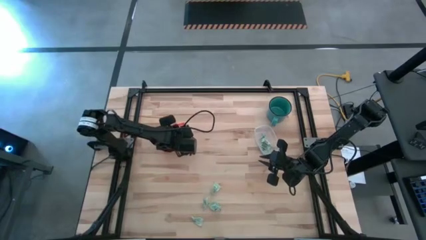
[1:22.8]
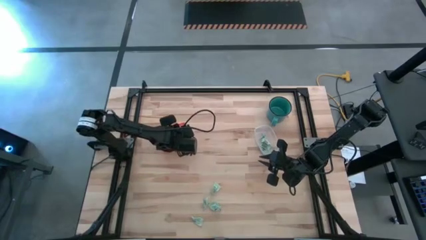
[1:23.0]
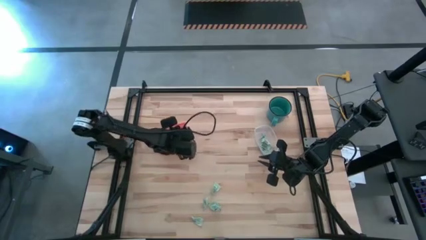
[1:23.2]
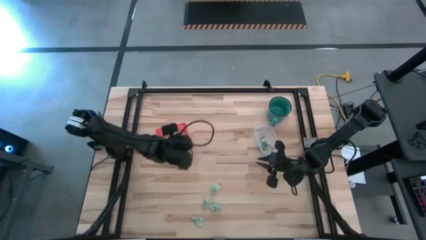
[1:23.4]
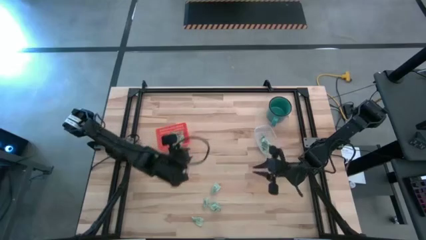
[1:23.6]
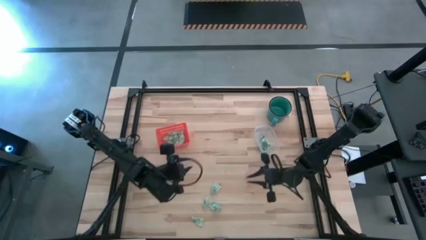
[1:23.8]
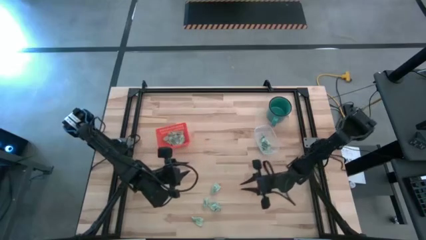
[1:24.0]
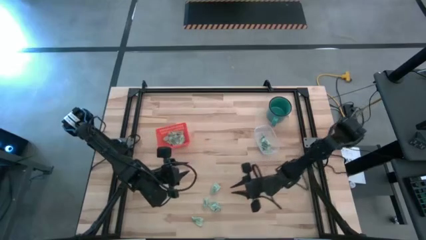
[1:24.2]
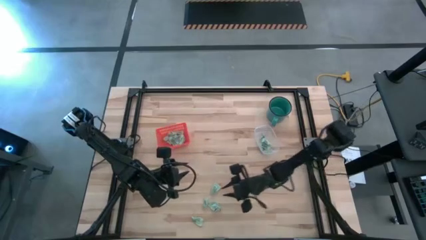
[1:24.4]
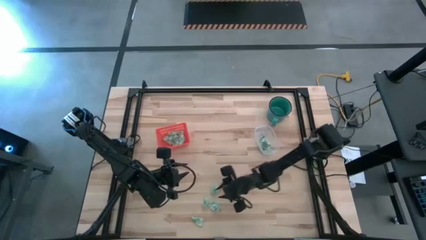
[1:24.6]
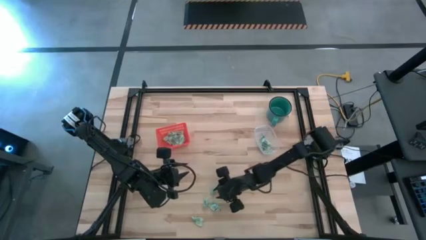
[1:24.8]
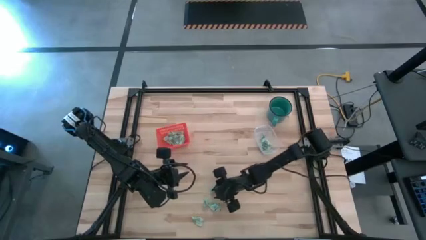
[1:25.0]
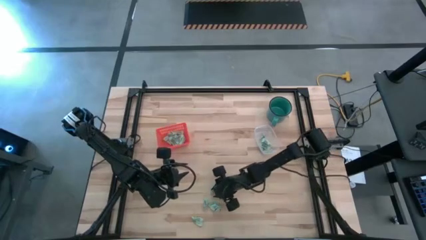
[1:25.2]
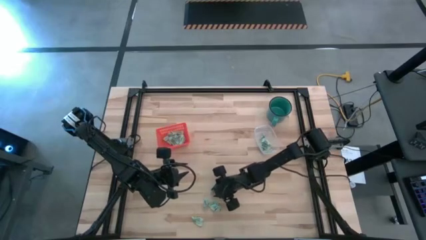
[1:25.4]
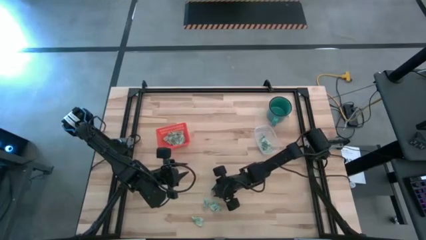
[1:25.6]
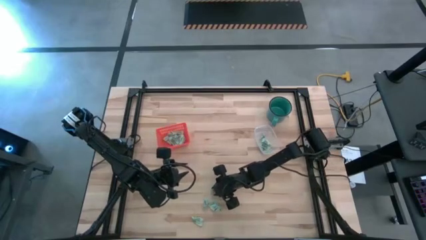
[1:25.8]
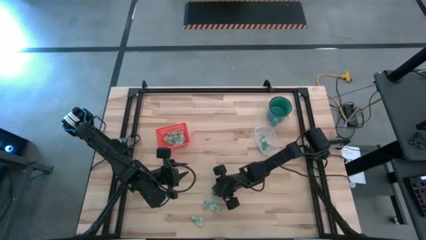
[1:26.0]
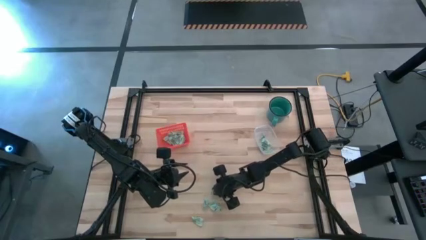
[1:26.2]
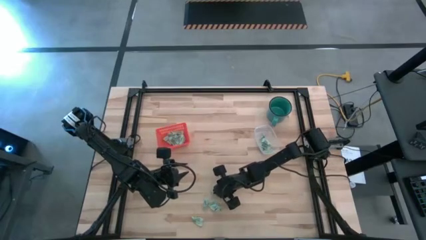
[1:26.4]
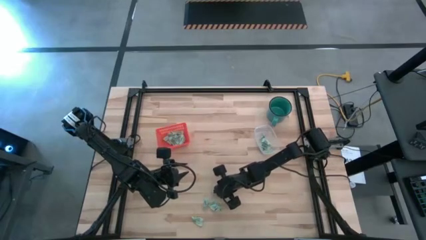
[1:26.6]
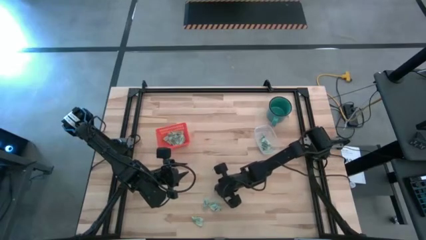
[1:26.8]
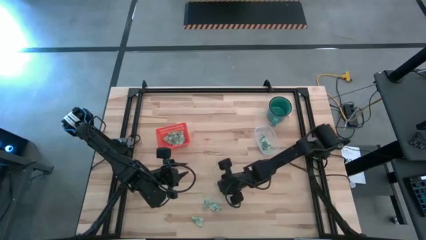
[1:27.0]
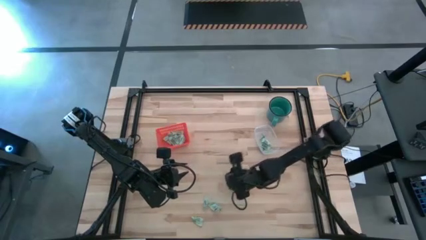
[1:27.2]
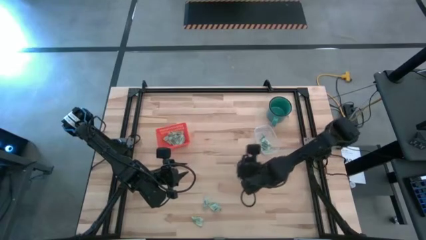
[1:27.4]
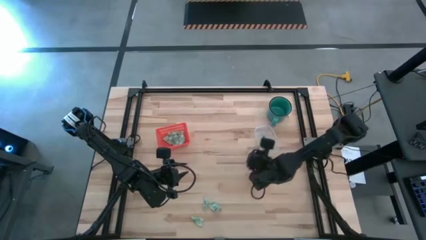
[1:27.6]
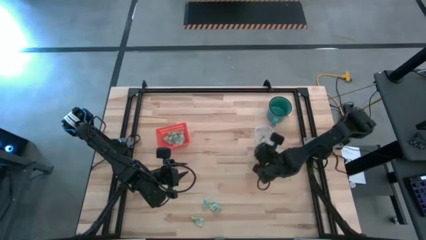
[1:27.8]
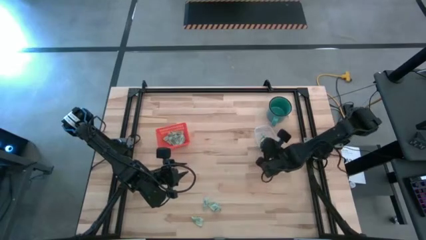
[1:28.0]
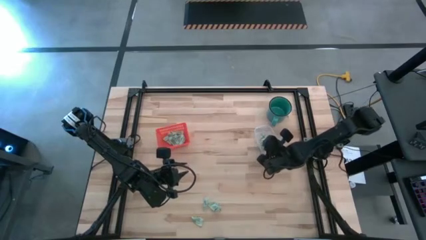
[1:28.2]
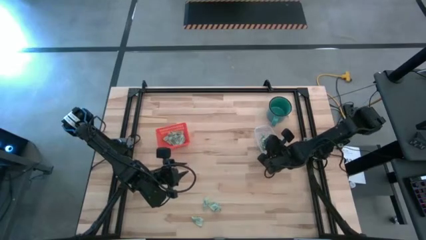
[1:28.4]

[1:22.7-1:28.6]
Task: Pick and place items into bin
Put the stevia packet into the transparent container

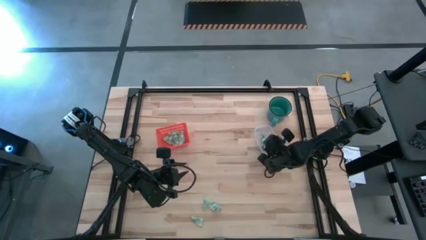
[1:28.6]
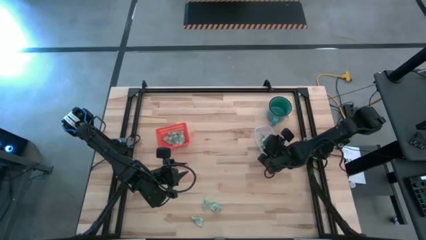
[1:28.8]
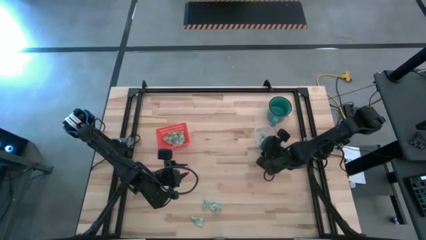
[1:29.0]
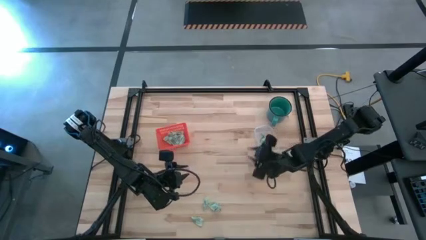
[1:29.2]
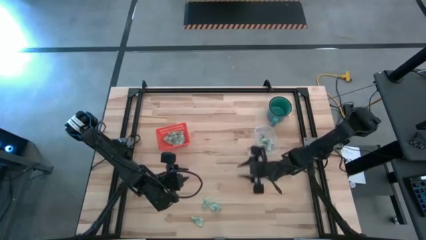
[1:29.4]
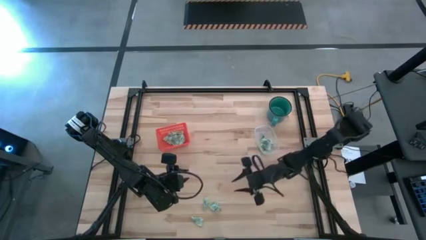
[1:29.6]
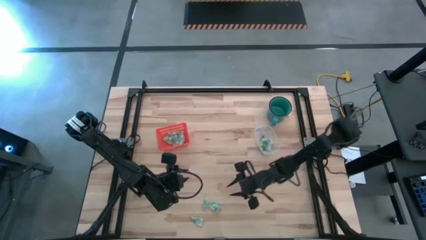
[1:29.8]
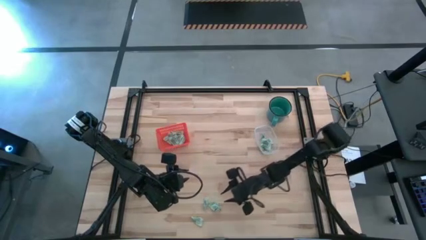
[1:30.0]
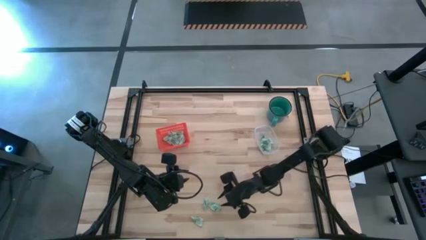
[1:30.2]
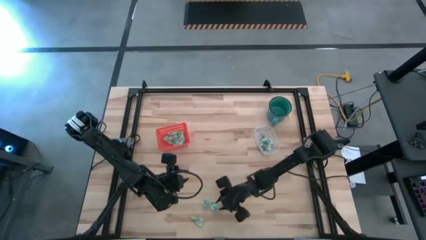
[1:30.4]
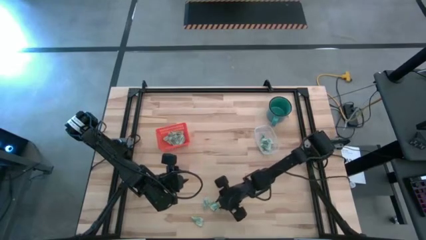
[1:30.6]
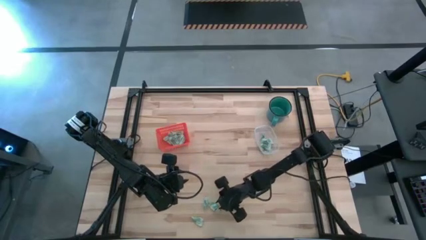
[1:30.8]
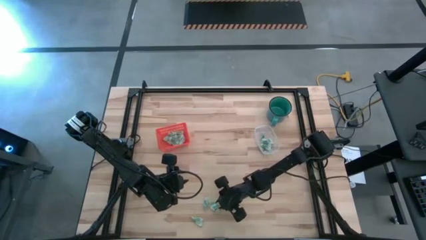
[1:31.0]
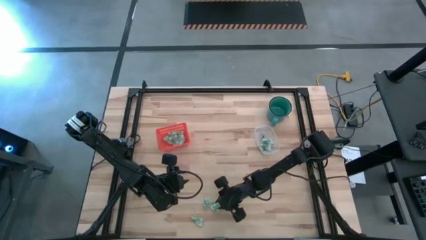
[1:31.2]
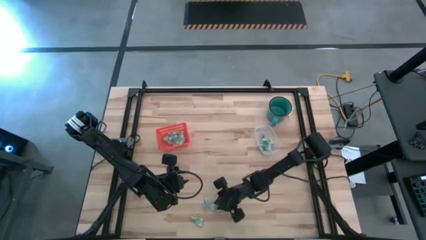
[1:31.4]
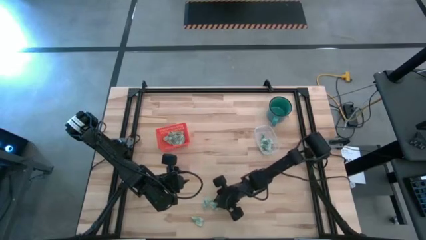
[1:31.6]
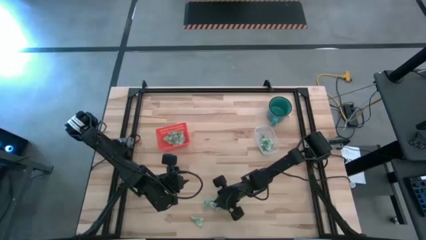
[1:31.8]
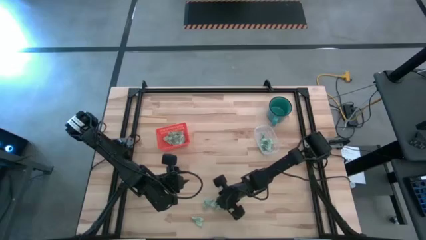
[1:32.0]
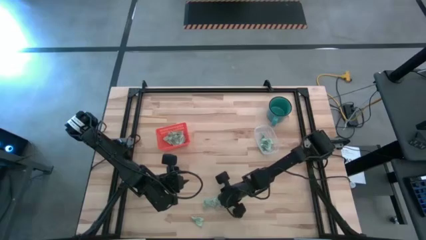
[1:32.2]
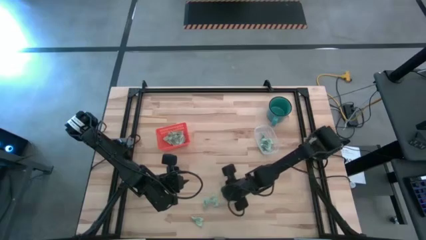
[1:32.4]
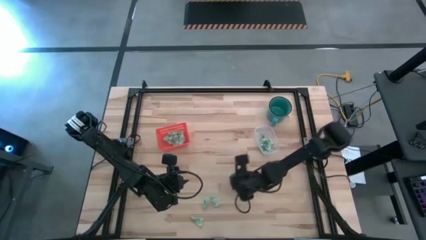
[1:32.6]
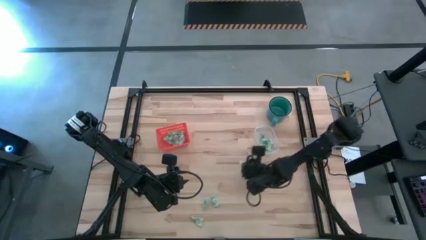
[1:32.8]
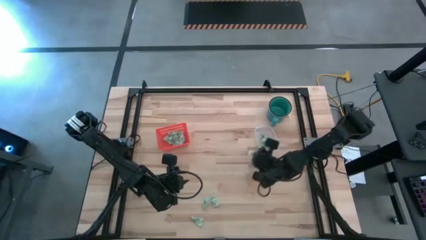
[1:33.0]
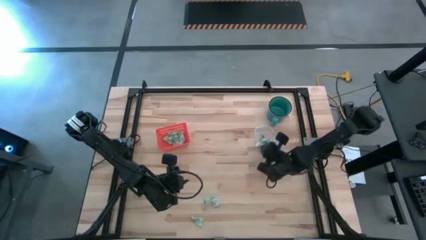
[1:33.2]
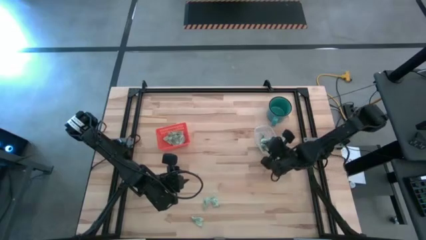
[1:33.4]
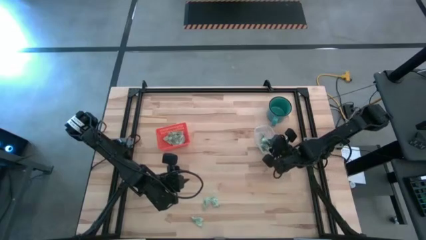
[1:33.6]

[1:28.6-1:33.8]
Put the stevia packet into the transparent container

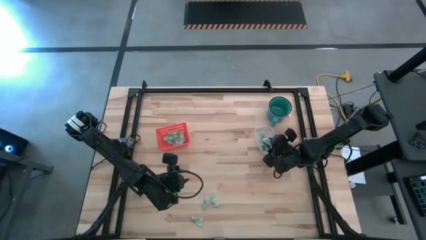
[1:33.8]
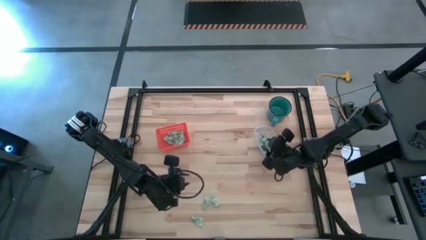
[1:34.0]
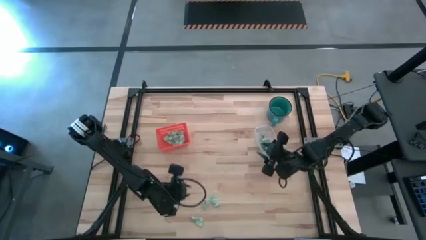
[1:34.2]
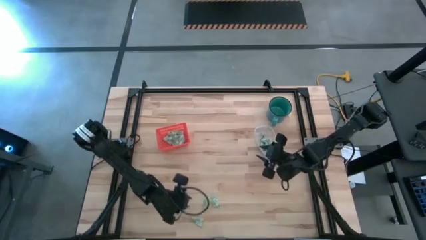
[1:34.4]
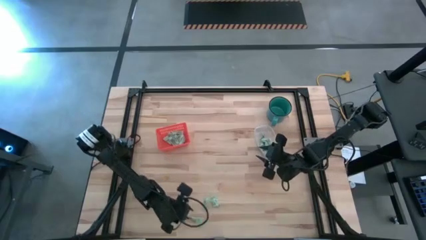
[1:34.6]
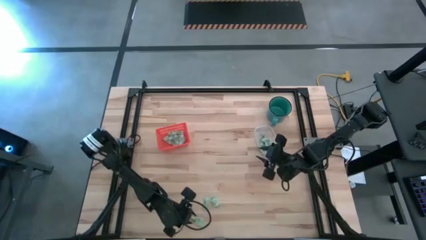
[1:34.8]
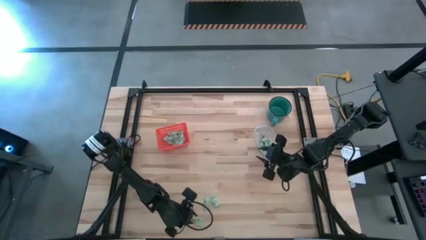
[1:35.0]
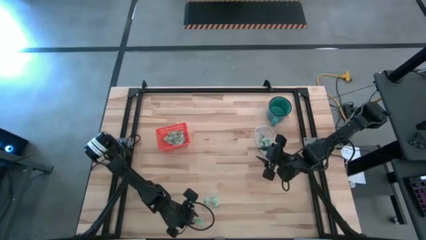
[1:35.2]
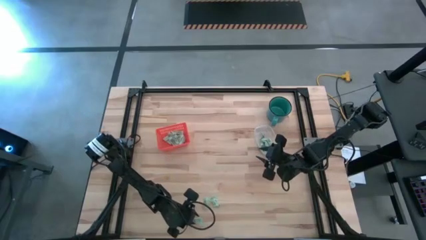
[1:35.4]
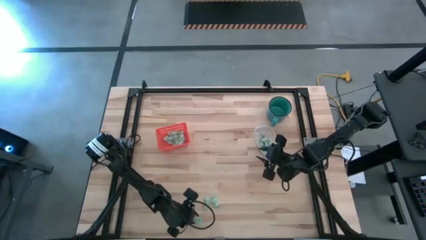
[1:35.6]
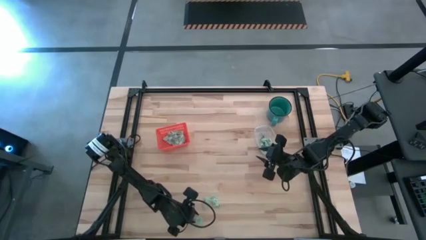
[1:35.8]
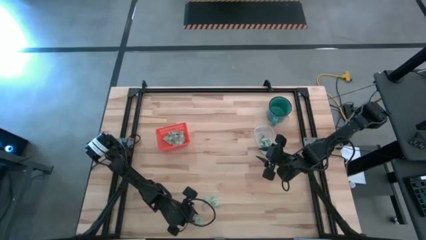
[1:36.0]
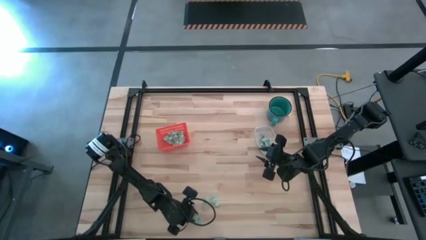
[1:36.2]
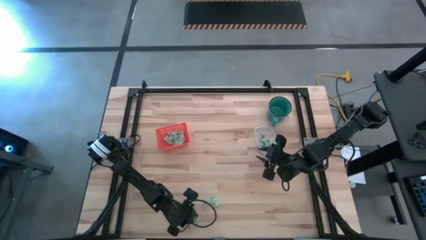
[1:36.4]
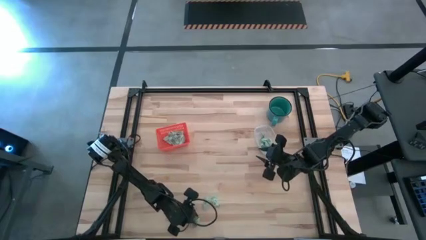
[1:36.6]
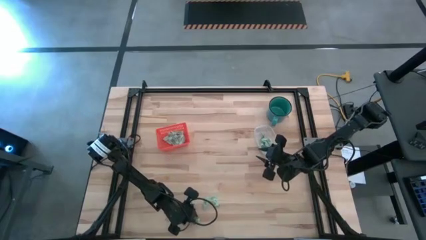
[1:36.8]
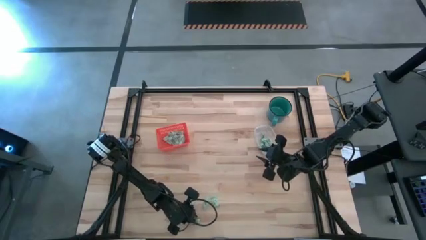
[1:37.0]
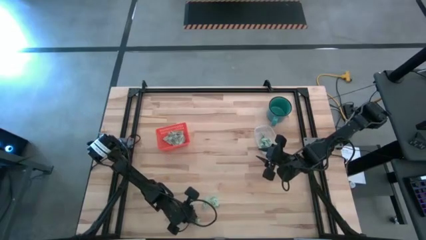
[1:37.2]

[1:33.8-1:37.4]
Put the stevia packet into the orange bin

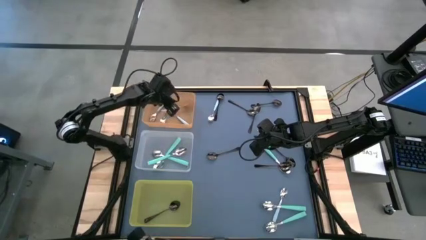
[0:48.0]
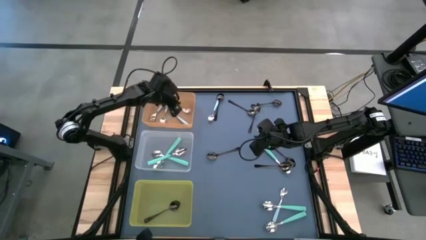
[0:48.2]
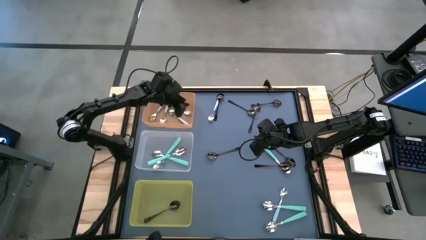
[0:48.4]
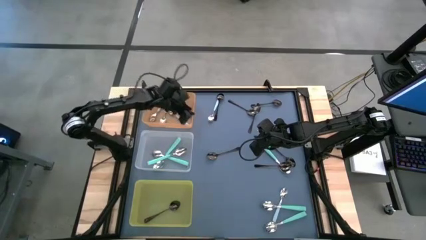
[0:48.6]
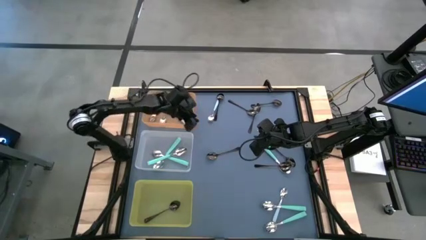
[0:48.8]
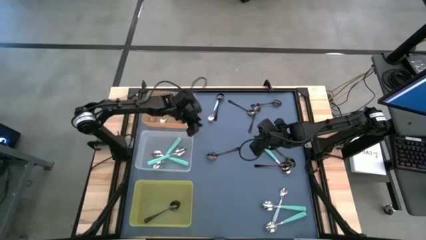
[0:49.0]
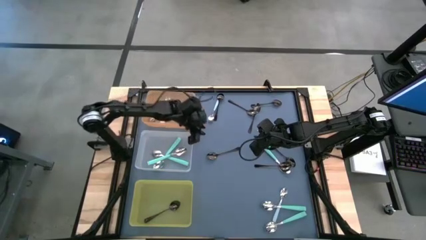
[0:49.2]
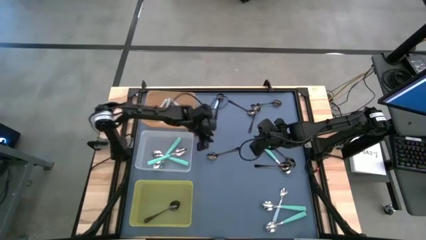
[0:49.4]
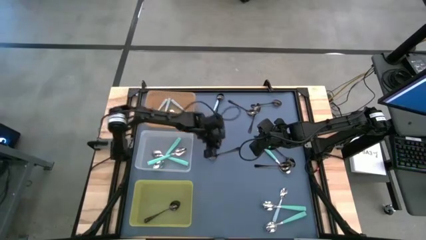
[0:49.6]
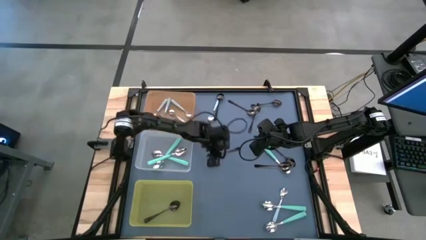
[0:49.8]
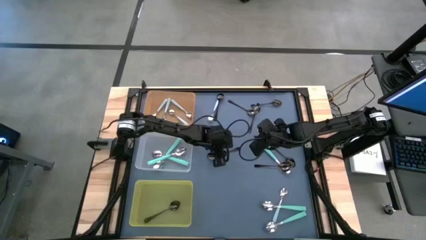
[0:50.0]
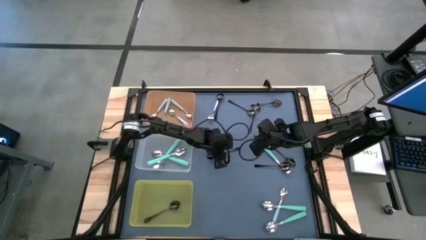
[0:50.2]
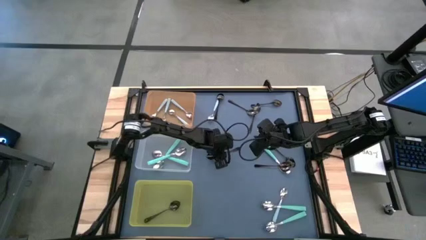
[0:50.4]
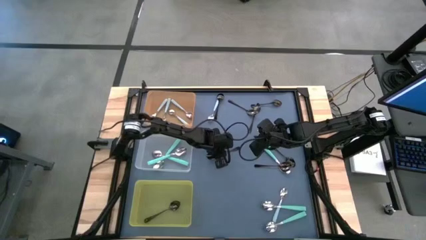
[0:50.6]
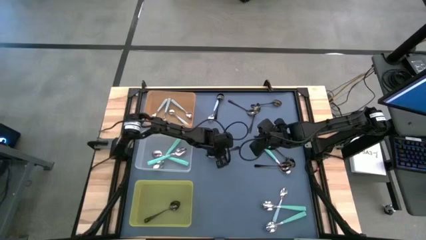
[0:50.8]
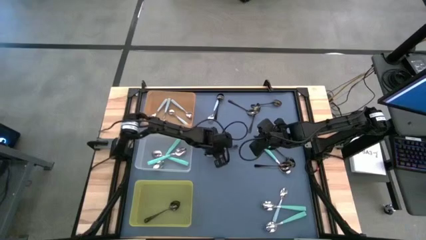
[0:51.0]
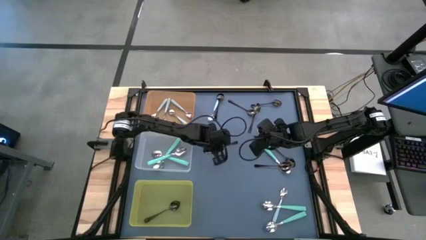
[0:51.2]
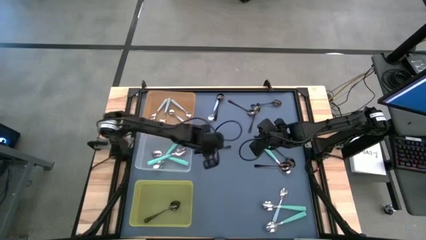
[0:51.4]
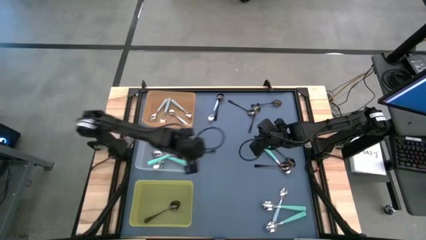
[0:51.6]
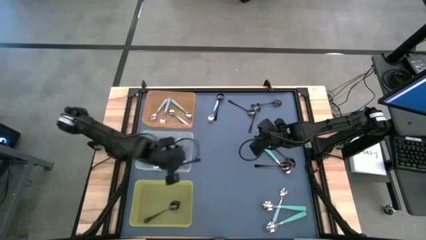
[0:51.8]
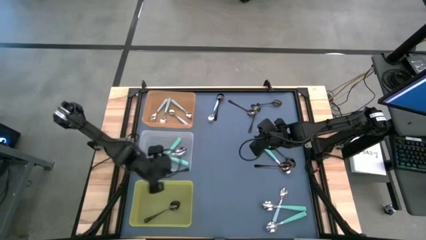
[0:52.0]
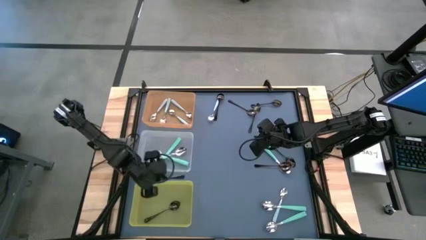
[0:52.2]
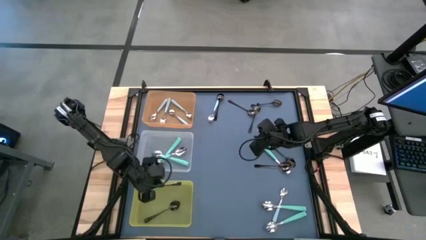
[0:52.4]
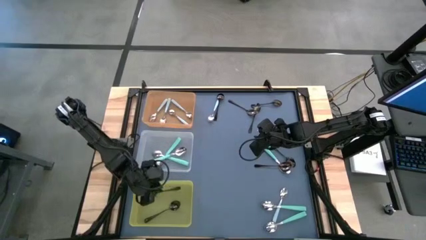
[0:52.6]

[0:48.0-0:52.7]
Task: Sort silverware by color (type)
Put the black spoon into the yellow bin
